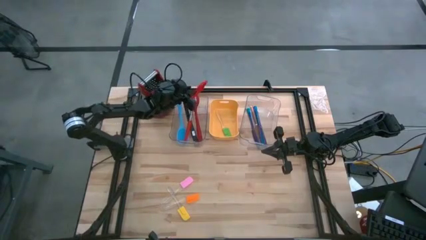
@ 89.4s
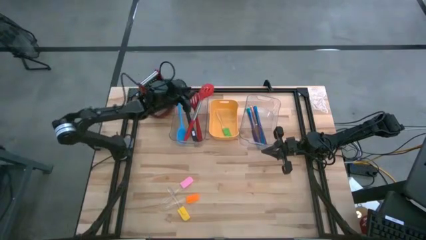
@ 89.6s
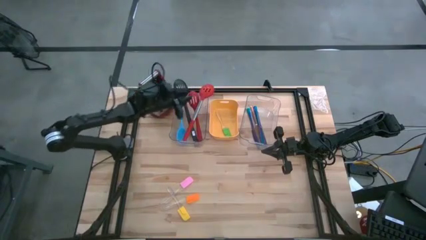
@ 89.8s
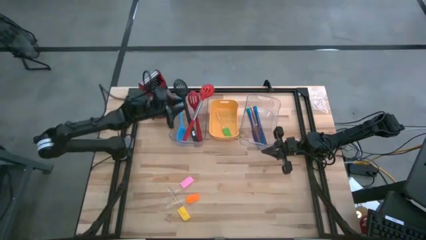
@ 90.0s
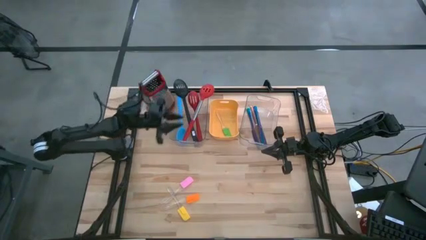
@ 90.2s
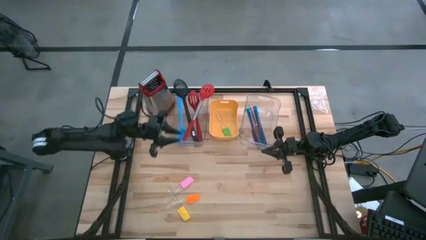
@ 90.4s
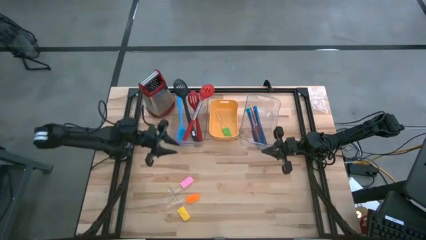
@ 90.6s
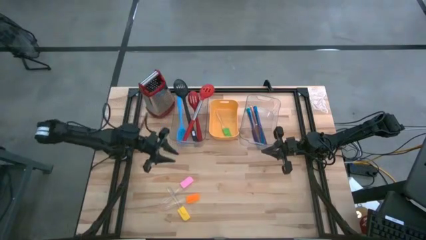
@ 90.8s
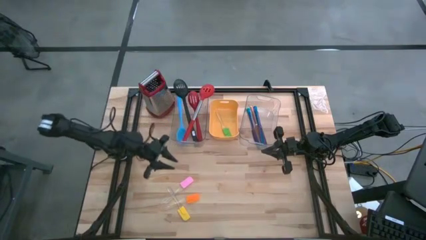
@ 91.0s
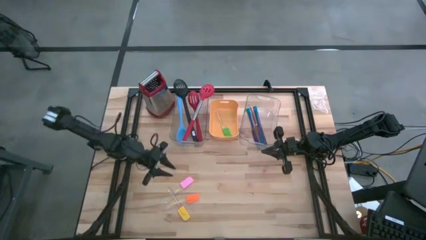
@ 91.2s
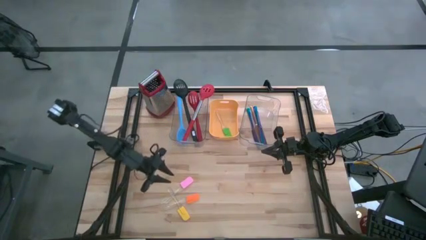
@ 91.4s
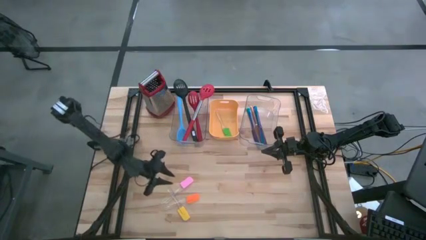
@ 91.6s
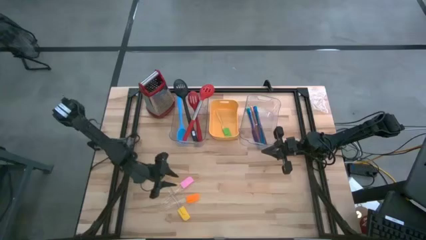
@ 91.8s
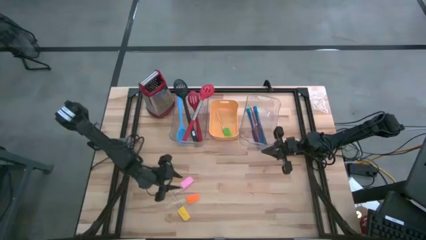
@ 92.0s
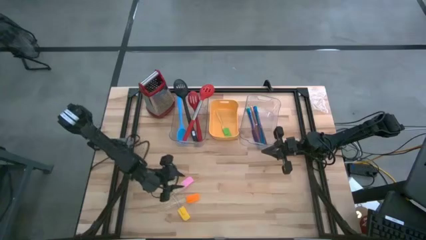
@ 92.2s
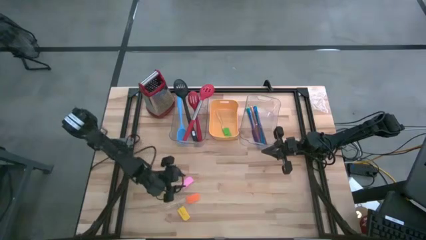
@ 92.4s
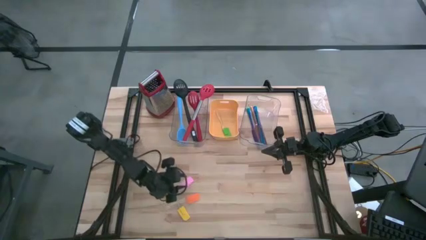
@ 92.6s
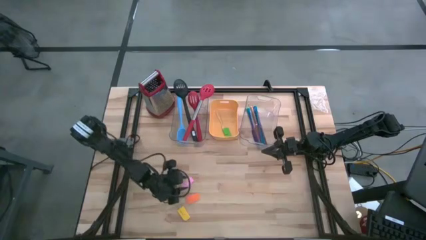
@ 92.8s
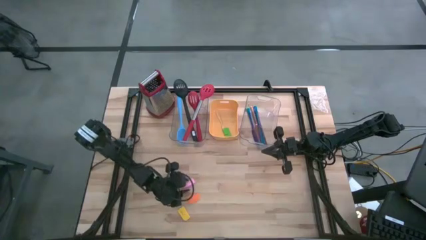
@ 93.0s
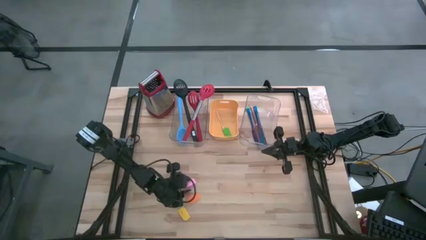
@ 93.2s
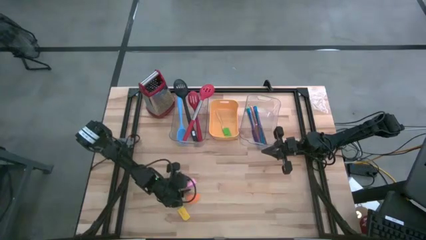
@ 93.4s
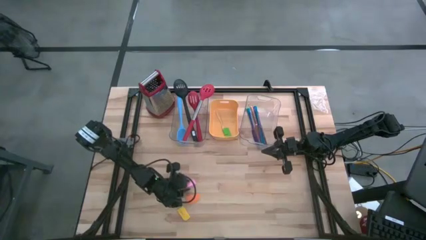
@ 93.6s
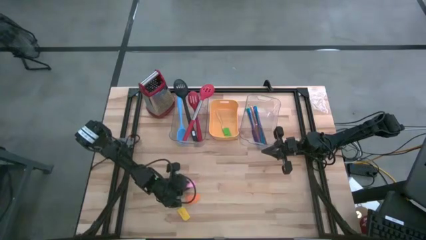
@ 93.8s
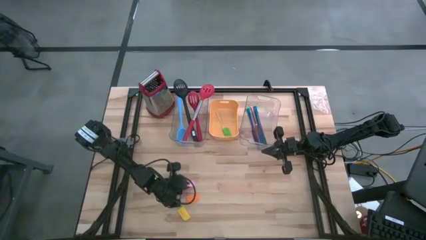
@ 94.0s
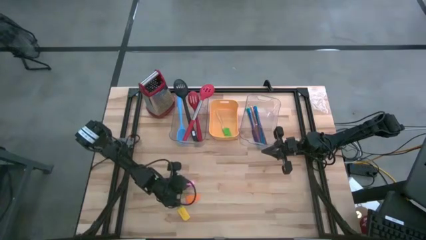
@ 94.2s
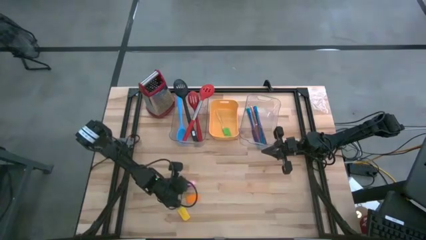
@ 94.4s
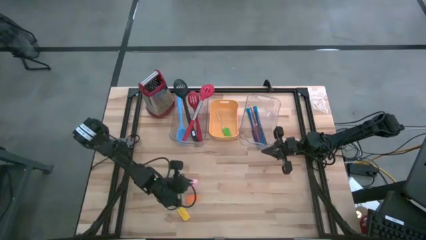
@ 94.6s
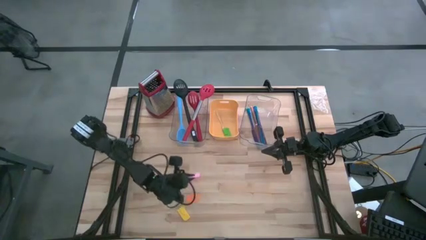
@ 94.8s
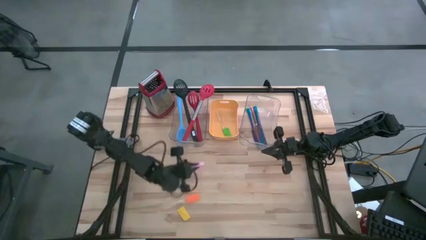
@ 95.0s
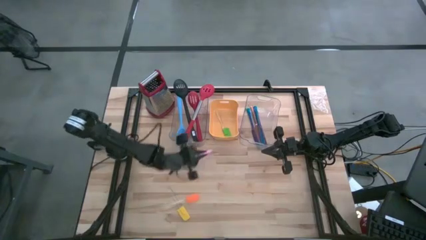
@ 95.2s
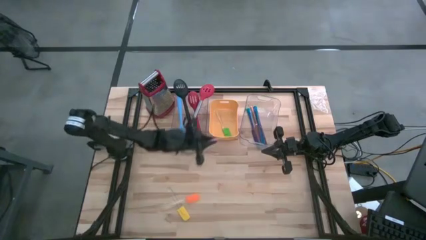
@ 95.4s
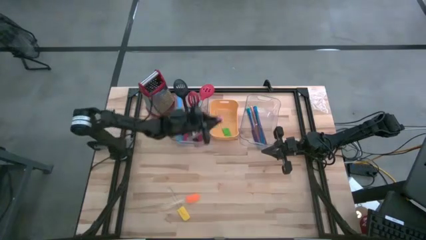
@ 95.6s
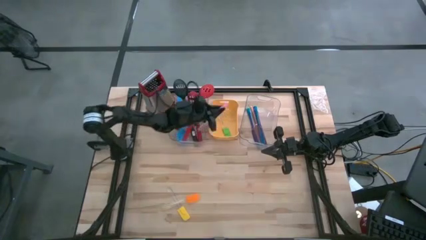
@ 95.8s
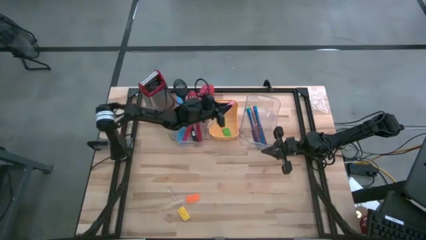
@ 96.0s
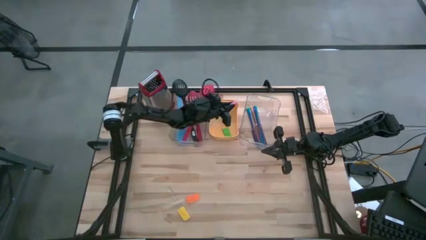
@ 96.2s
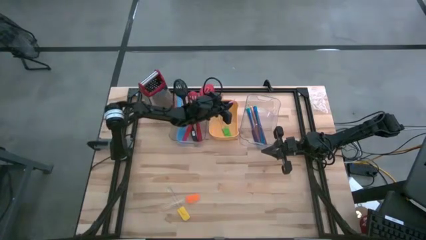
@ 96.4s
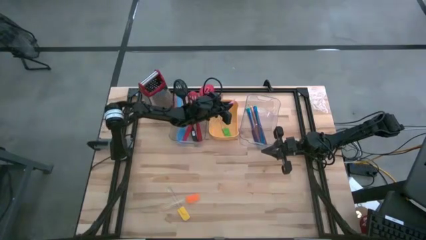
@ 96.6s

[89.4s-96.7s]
Task: Pick & Place Kitchen Items
Put the pink spatula into the yellow bin

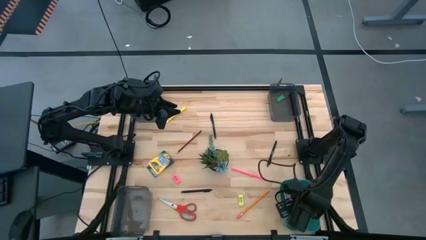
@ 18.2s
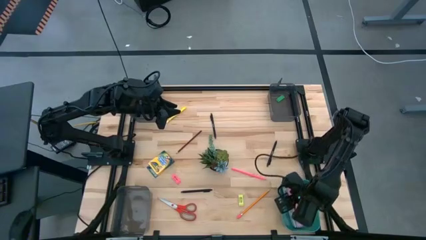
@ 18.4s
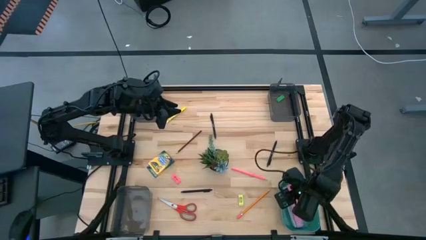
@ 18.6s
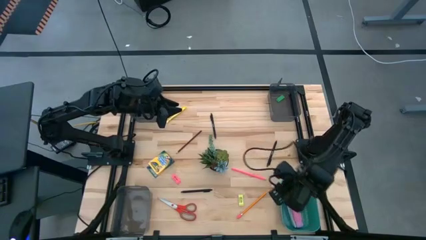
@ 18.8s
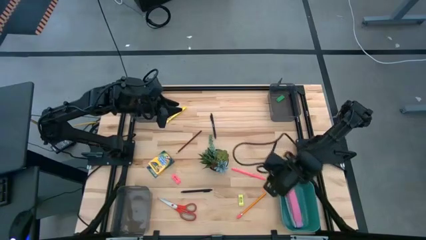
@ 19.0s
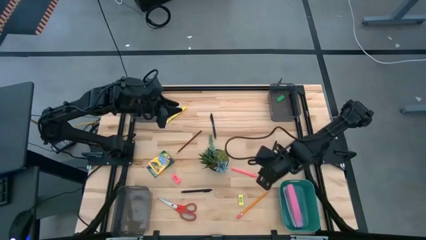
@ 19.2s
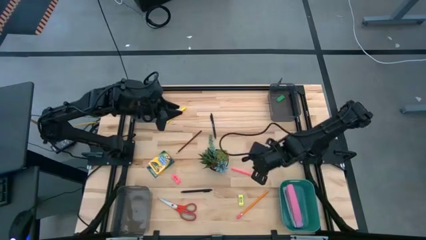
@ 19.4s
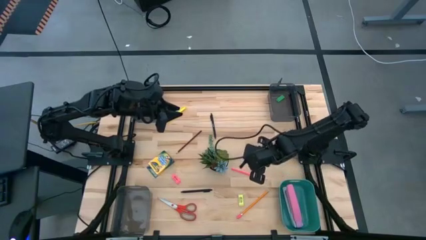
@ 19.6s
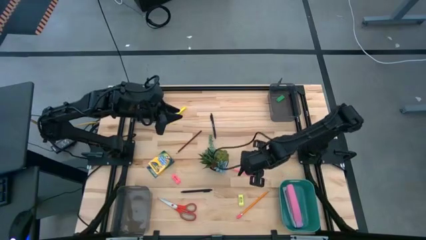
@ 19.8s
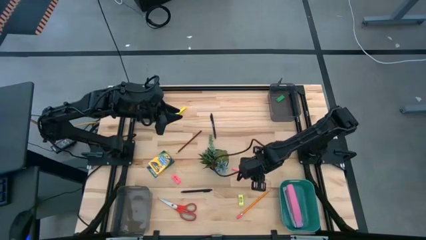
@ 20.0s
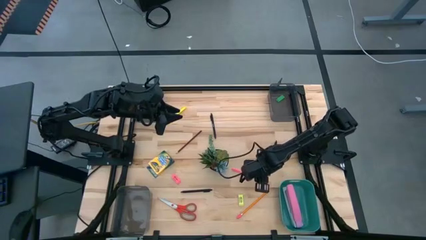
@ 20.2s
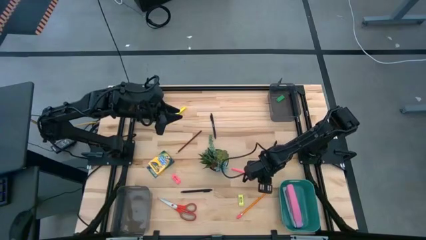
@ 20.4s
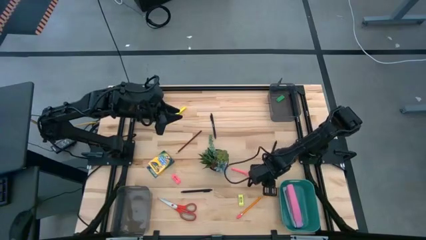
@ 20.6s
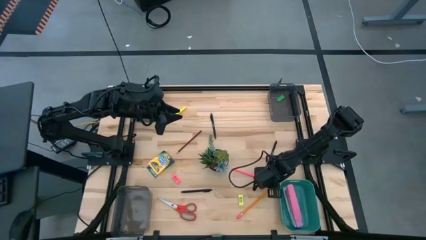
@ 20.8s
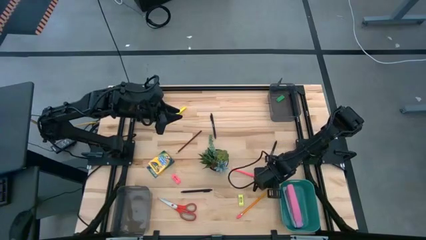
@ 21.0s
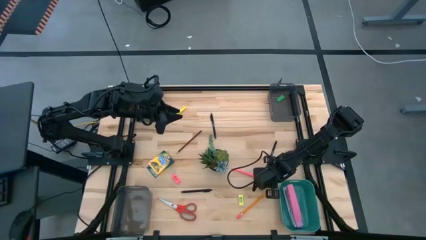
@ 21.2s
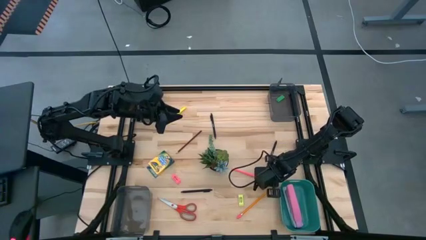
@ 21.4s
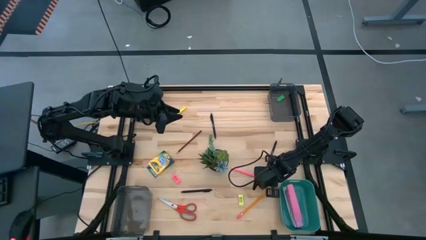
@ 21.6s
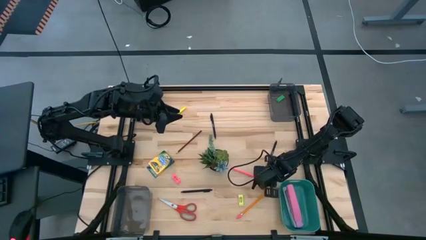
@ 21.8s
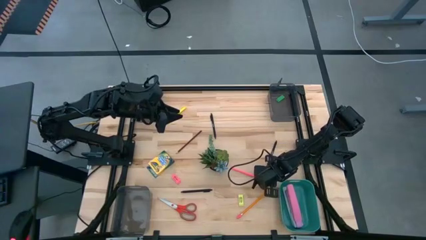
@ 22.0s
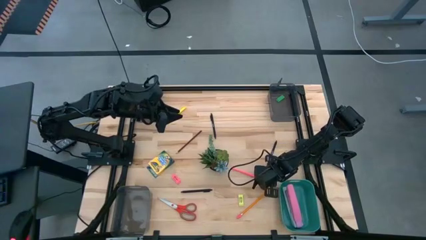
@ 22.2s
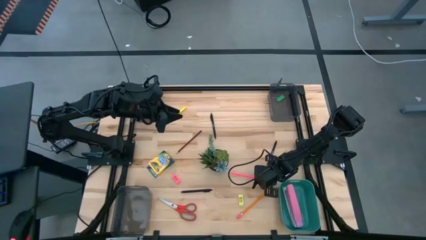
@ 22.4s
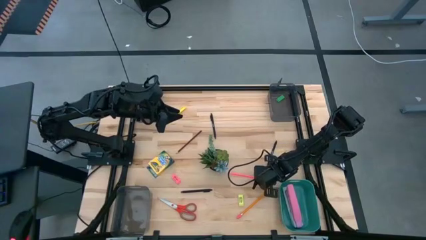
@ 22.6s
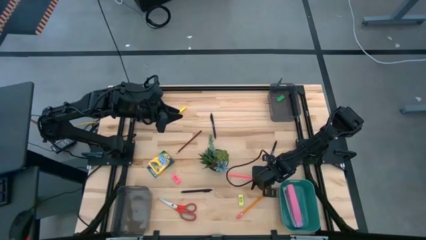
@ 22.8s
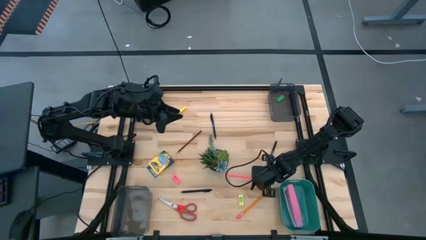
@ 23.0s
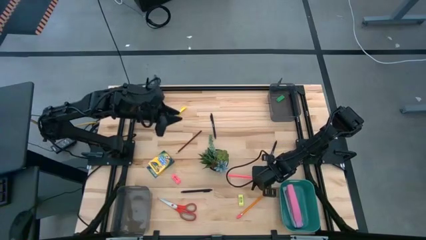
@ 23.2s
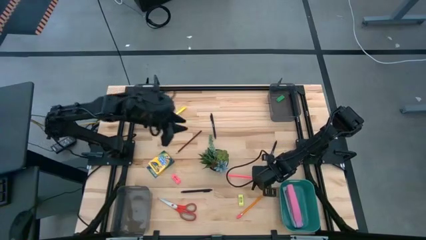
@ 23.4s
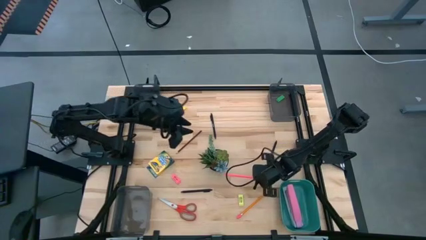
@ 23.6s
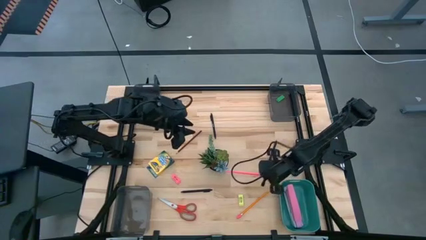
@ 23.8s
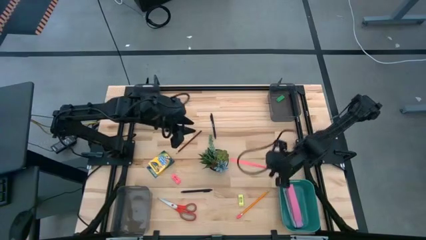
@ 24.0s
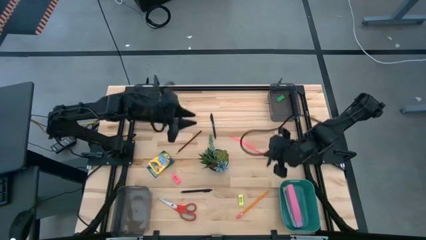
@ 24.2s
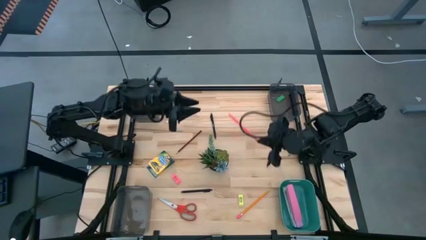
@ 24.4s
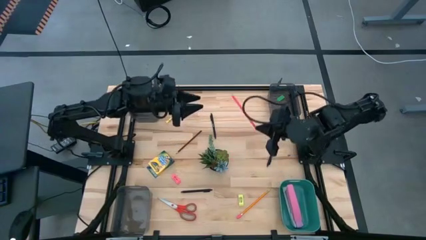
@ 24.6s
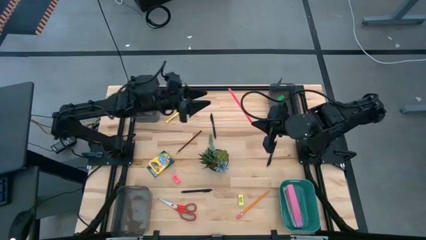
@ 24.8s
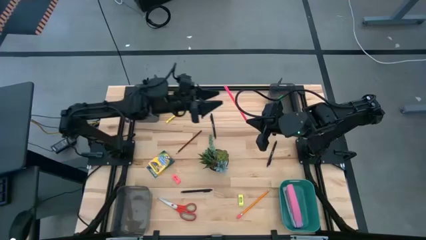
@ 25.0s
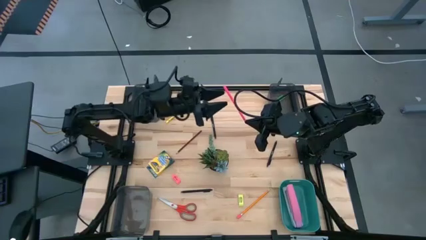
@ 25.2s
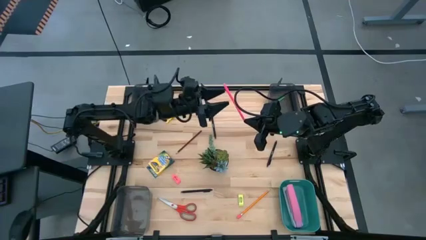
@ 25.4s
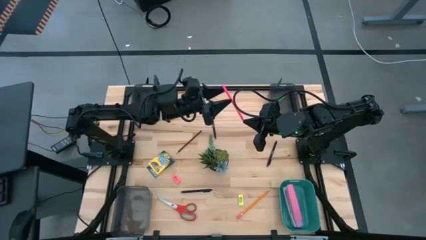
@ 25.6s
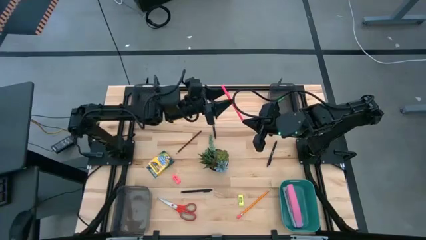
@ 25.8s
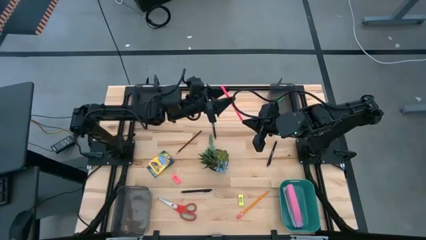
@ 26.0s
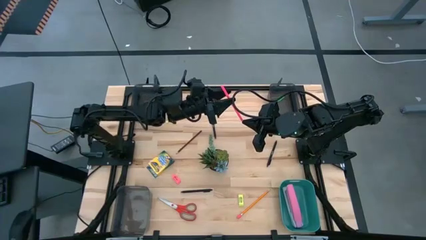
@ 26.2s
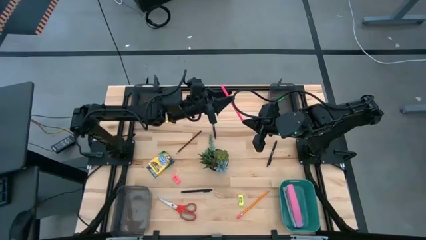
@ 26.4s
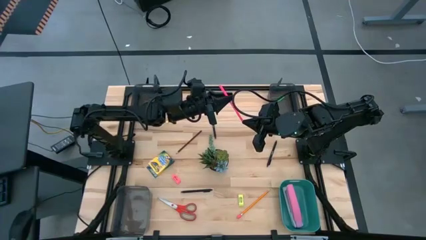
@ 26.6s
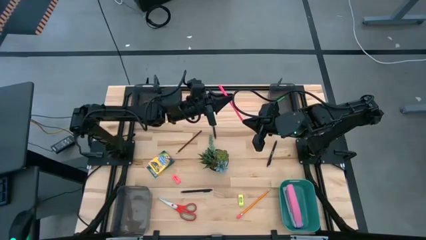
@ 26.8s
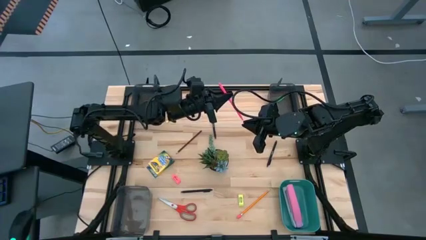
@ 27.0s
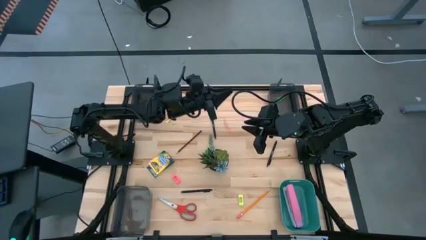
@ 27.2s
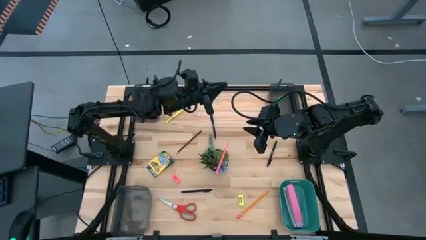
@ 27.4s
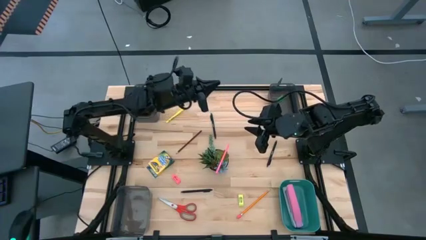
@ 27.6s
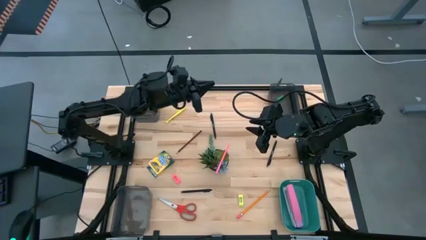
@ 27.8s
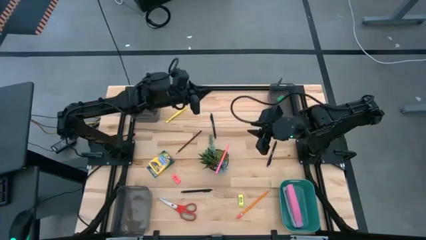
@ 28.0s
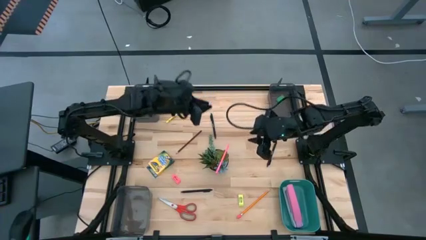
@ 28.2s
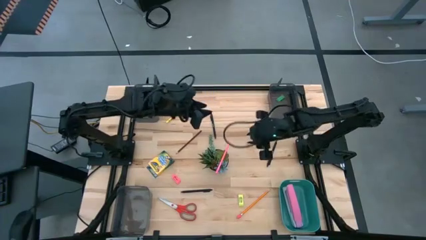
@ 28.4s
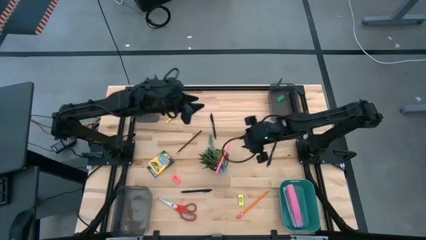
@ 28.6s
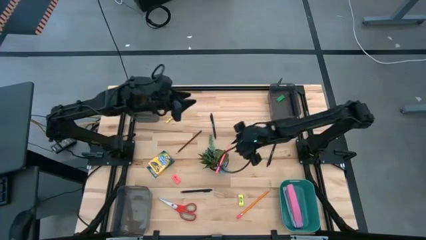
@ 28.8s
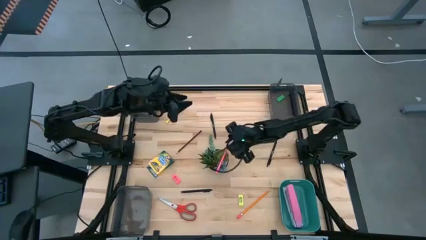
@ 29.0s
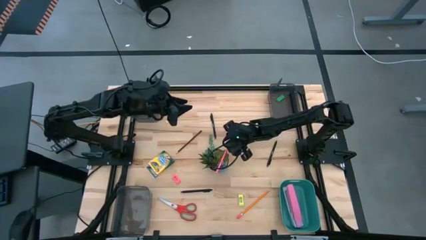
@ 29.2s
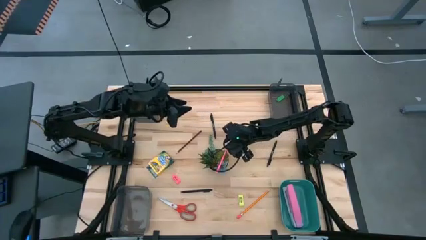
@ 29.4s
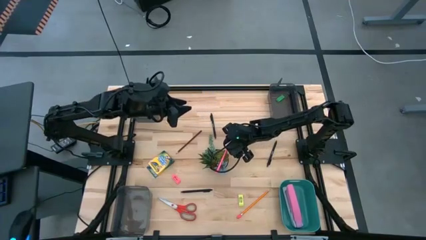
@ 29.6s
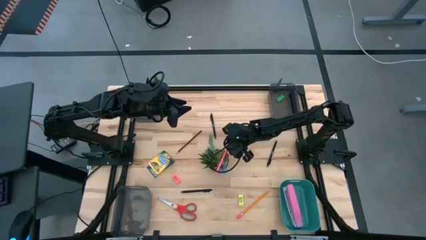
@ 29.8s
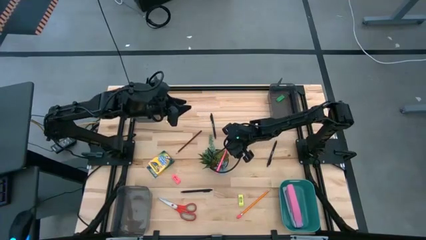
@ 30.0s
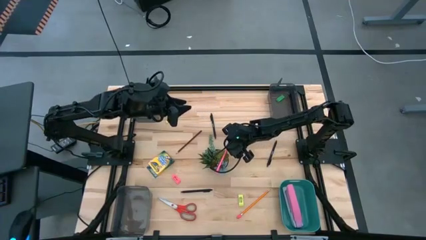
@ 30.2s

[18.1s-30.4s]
Task: Sort crayons/erasers/pens/pencils in bins
Put the pink pencil into the top left black bin
